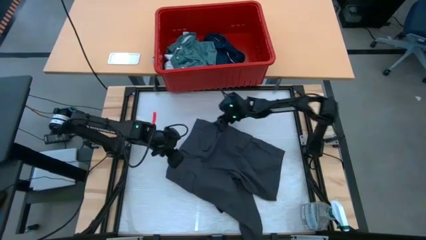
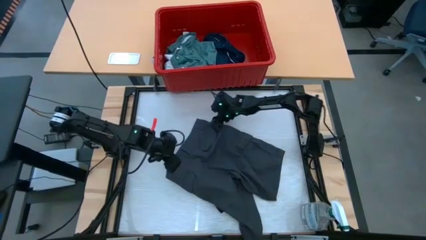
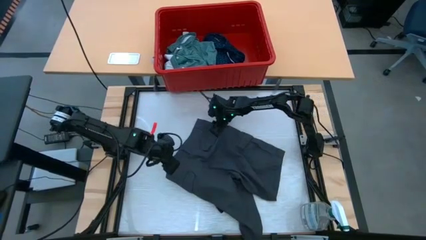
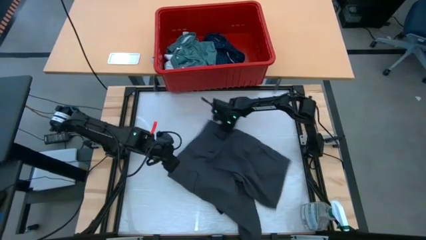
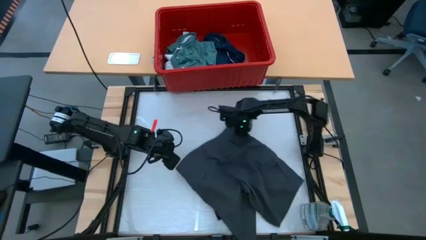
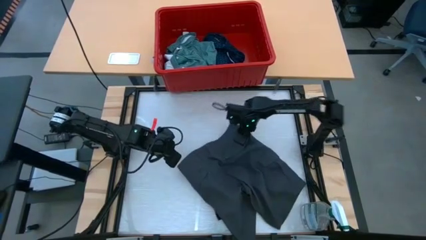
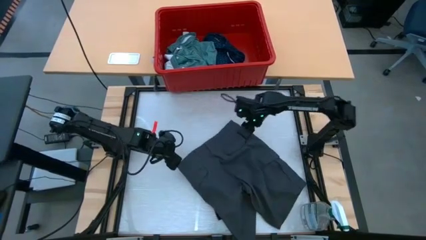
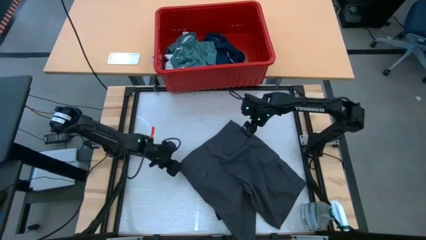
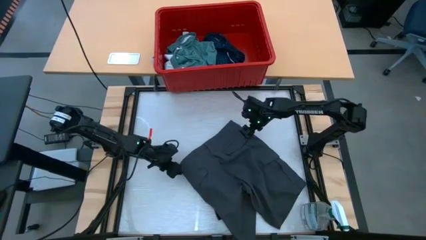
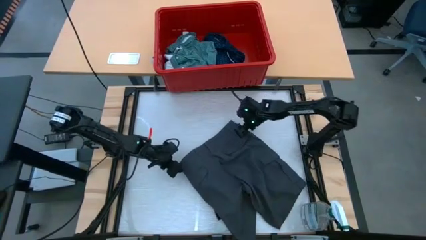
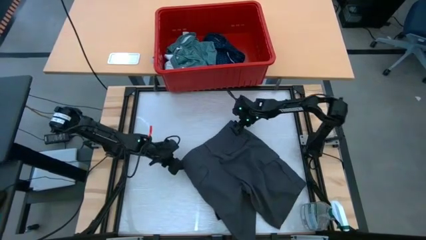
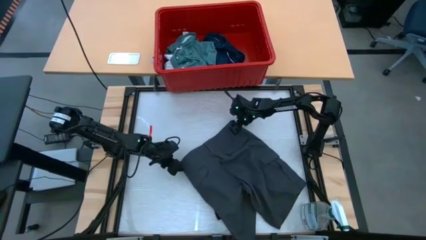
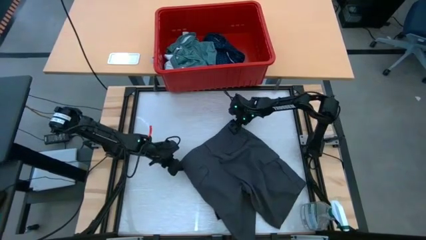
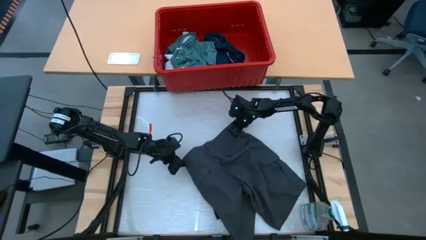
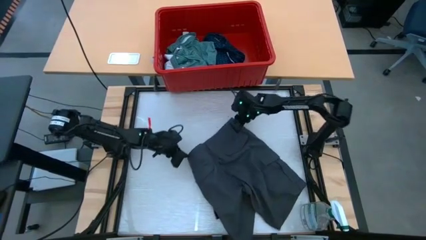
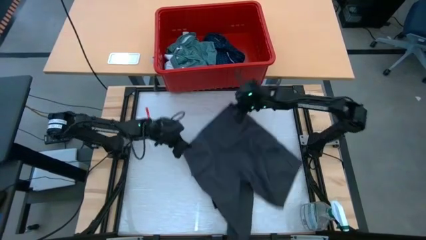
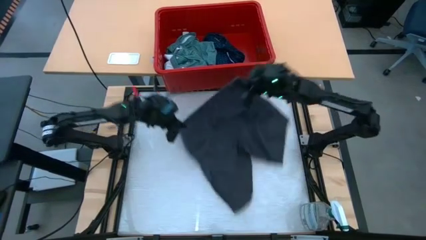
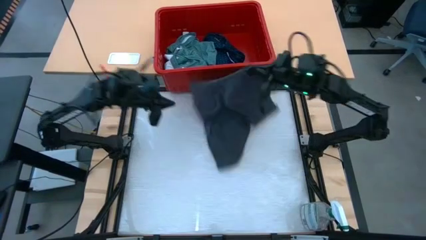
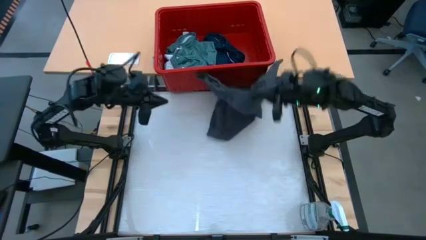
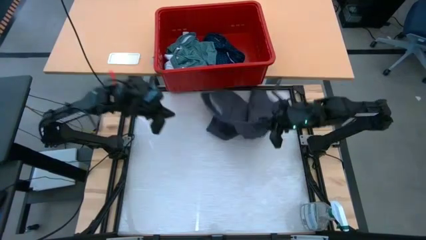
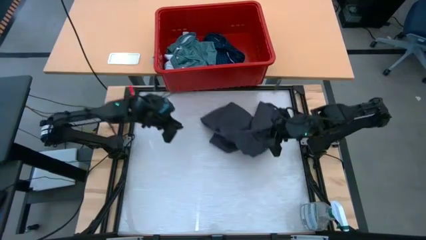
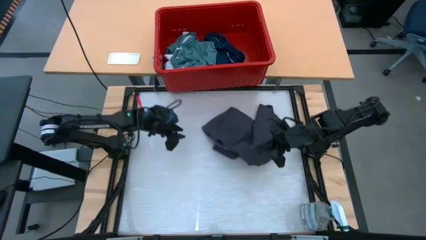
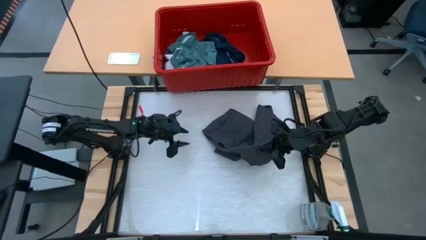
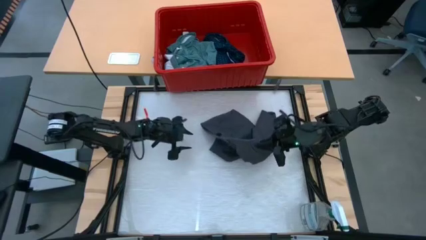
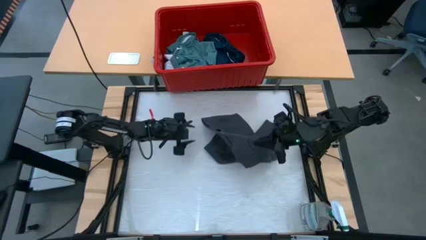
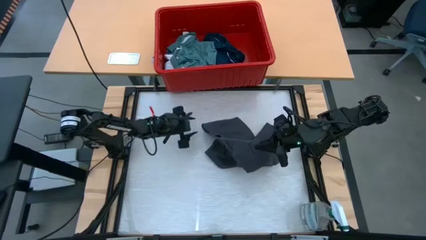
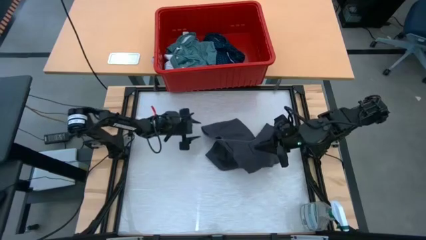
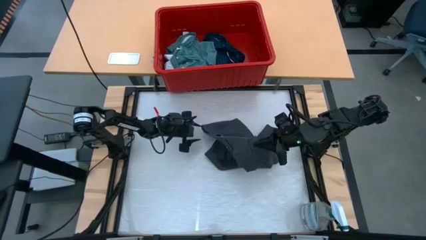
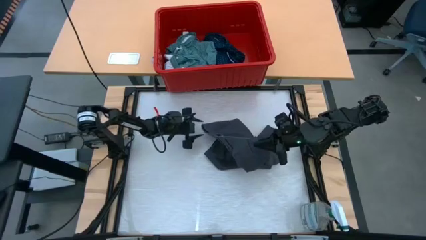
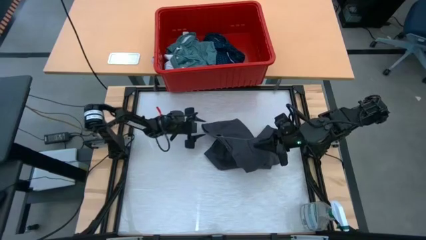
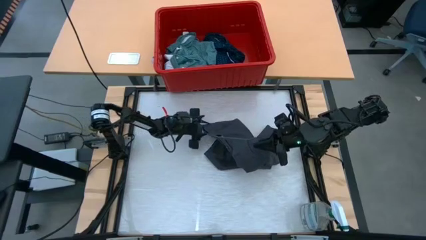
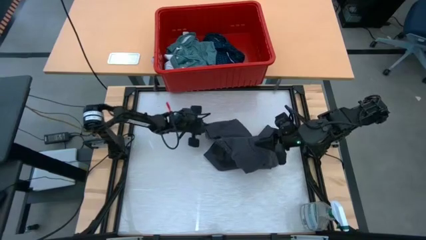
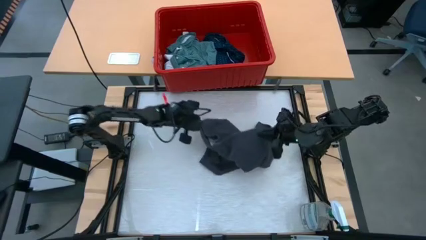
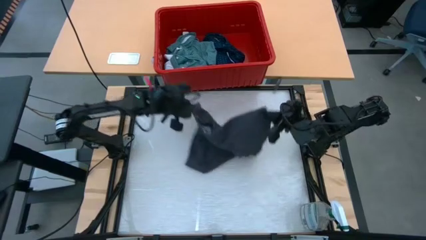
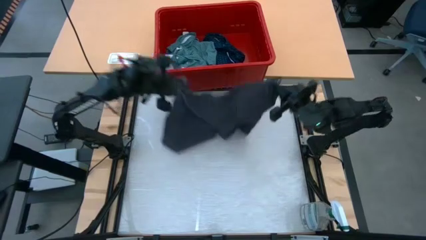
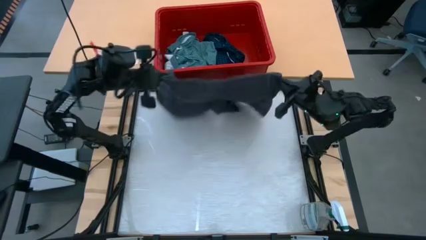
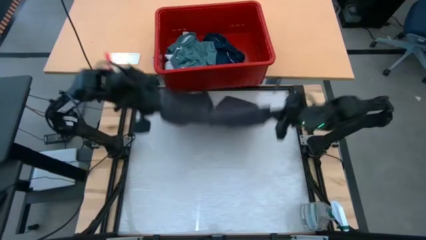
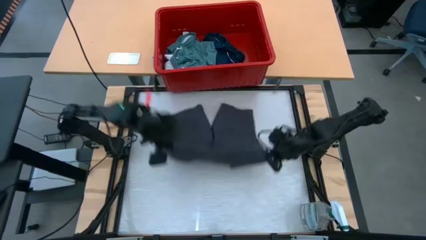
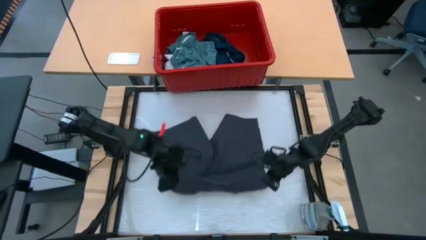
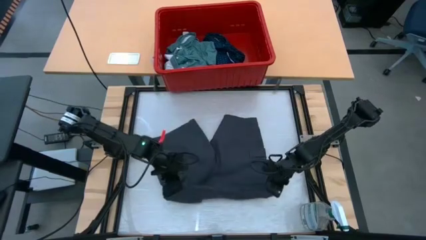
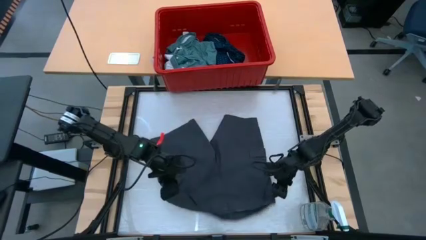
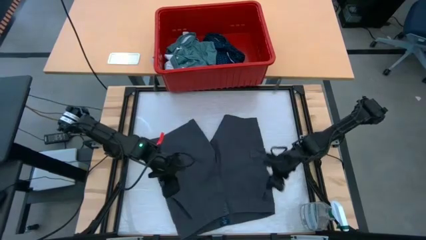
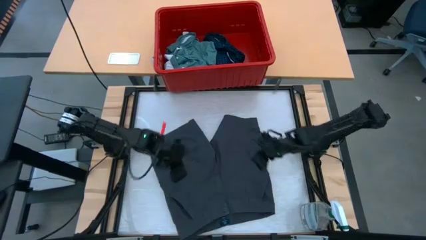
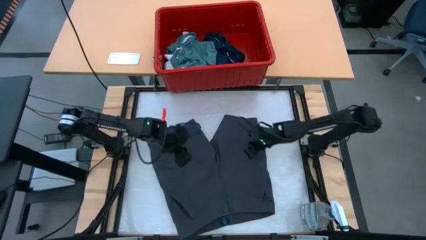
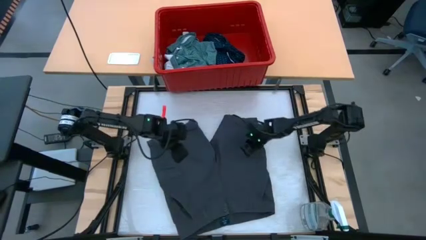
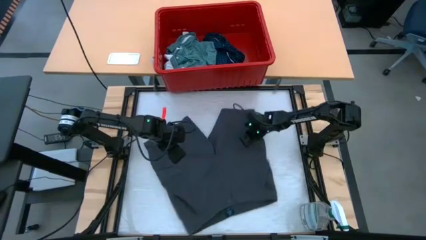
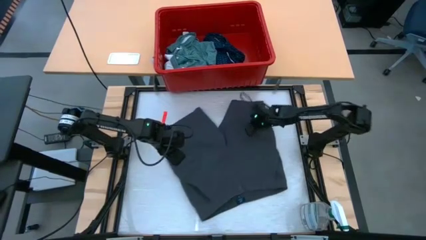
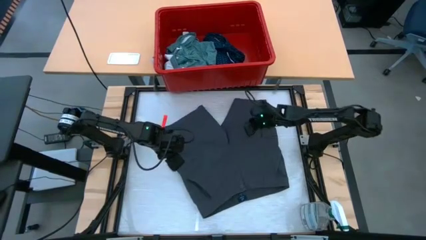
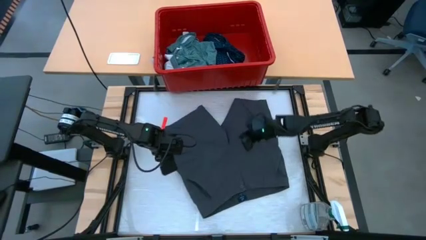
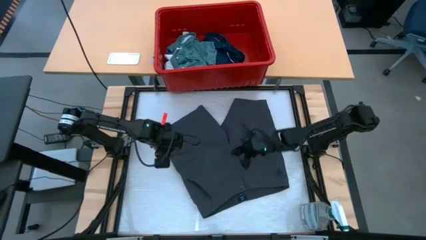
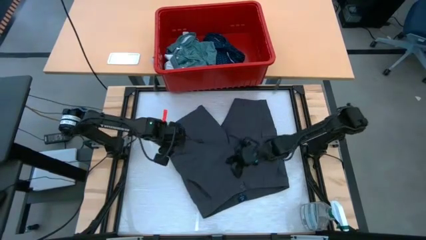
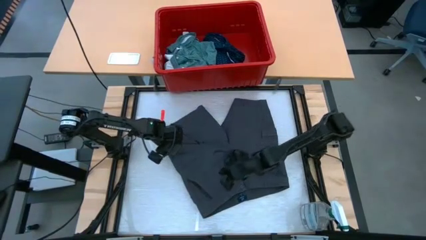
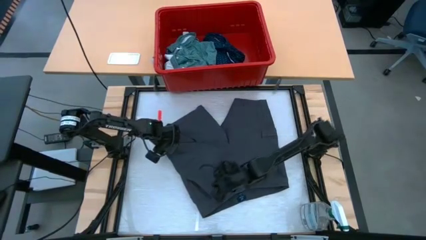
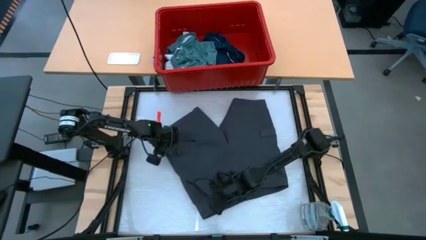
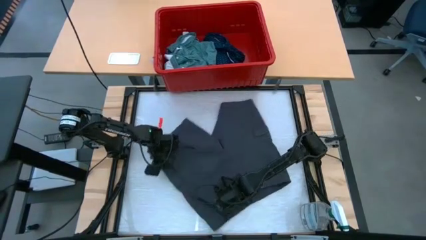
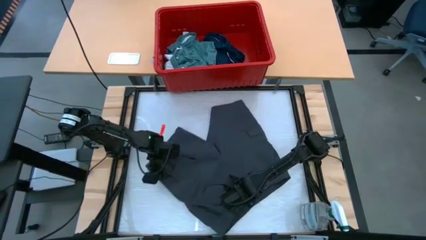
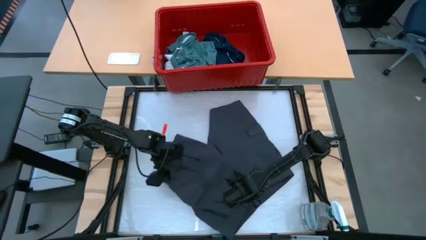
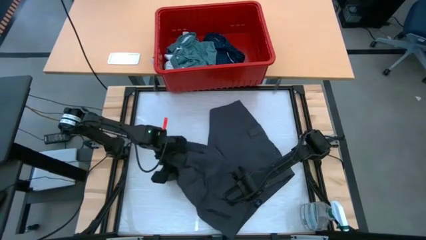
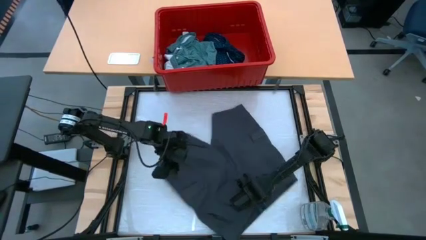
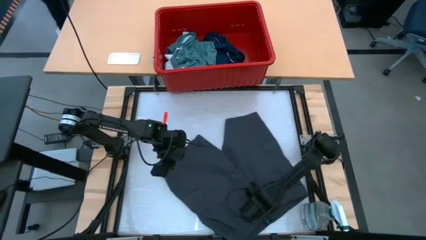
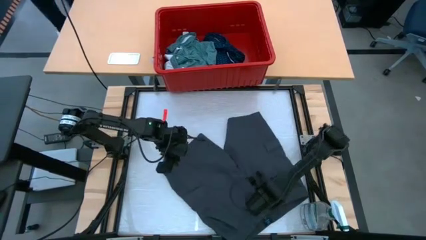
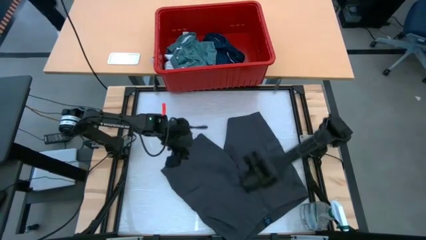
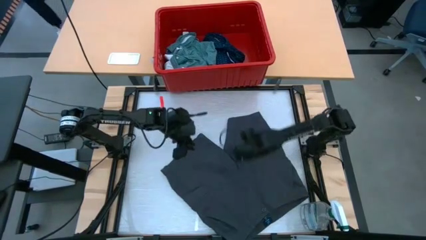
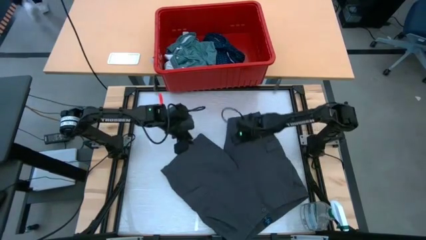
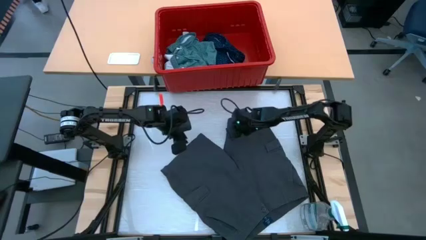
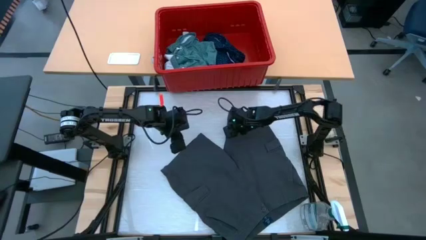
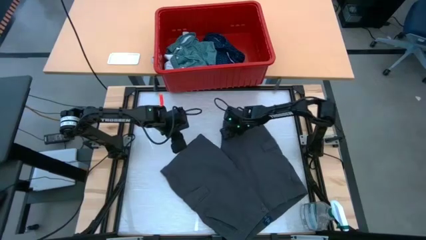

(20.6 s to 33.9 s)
Task: Fold laundry
Fold the black pants

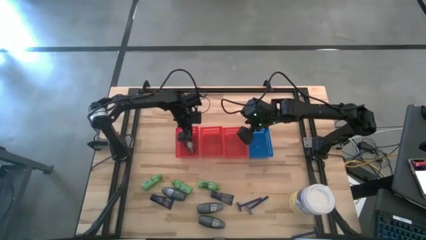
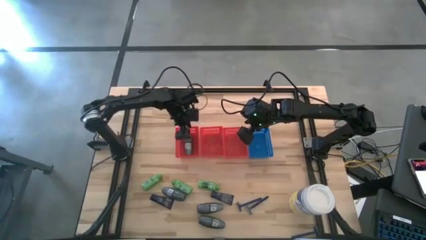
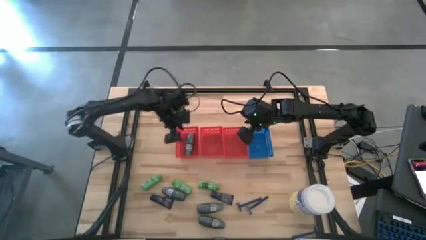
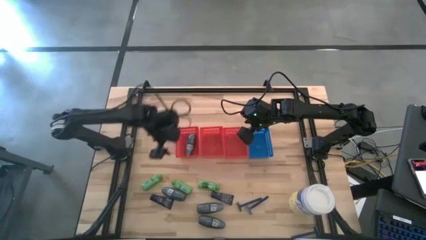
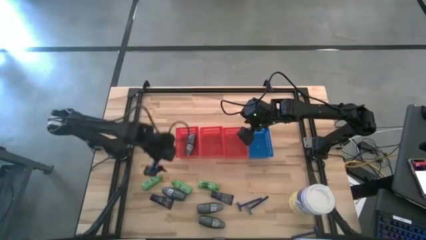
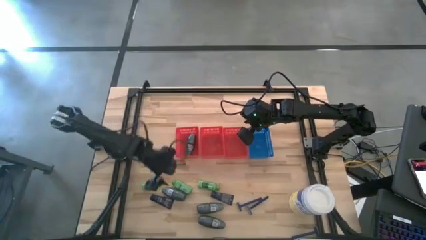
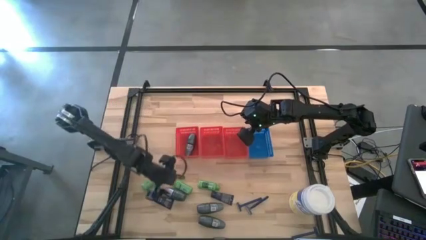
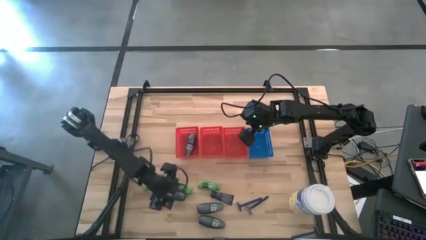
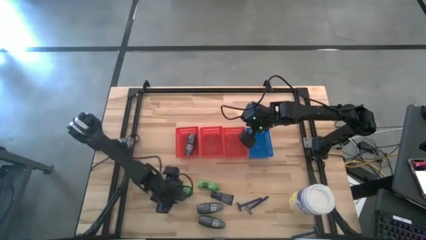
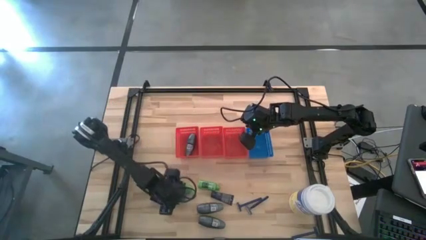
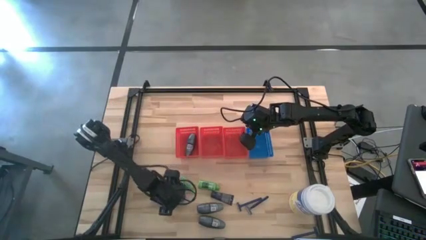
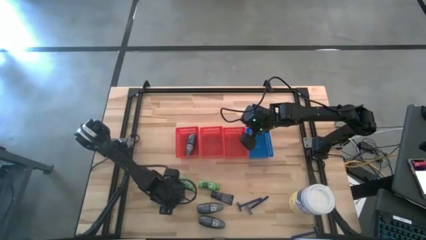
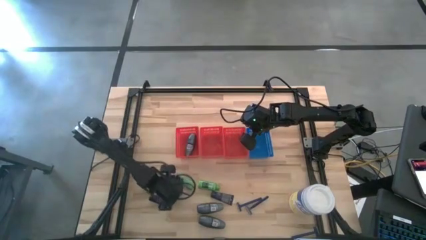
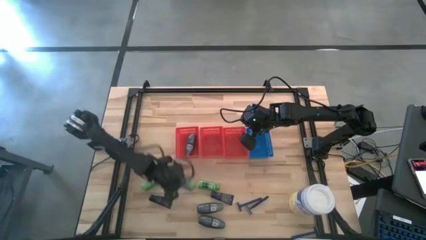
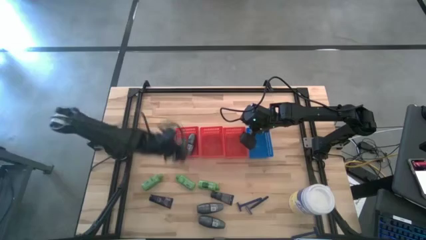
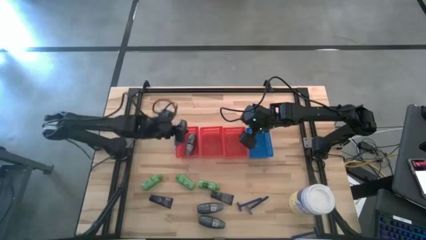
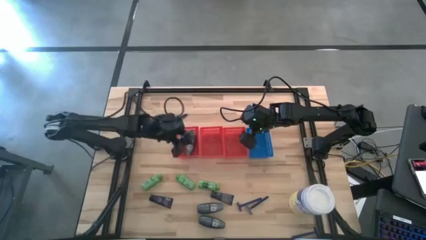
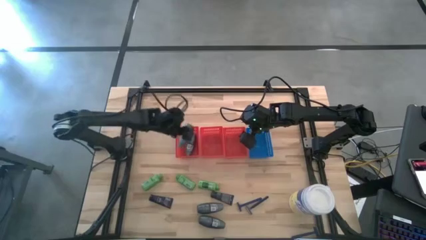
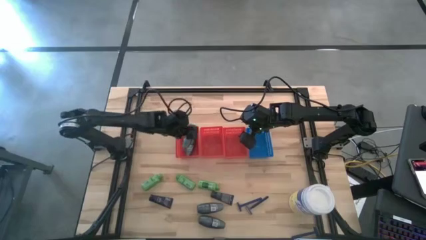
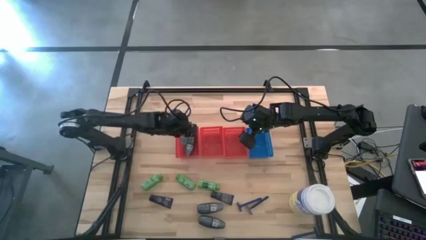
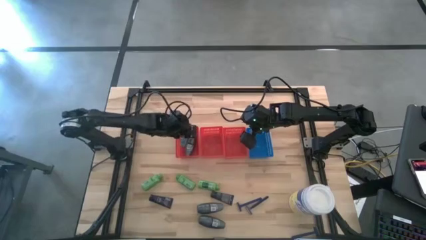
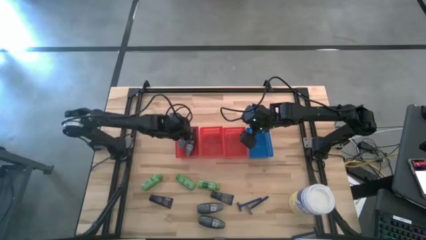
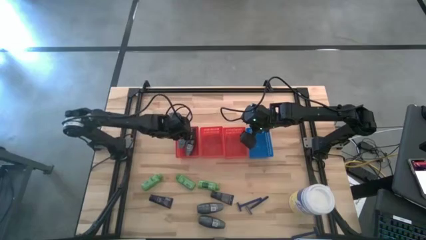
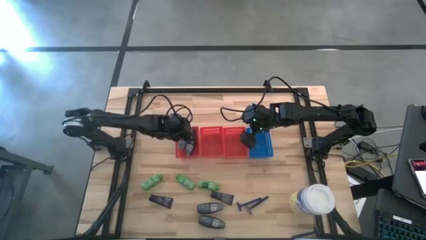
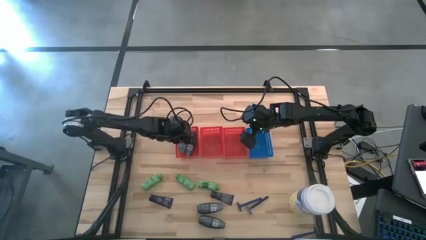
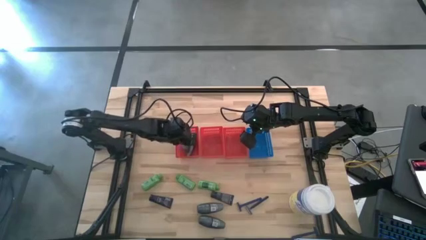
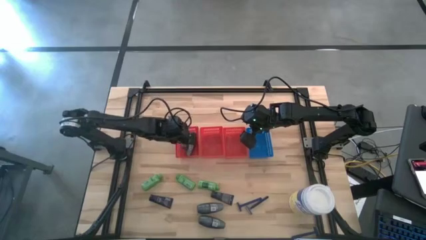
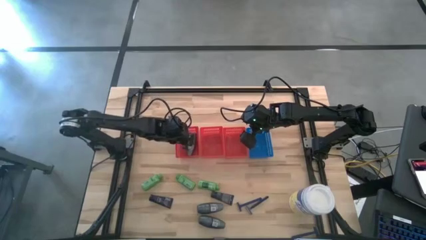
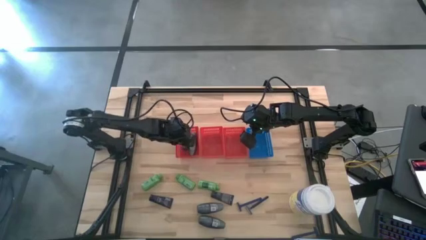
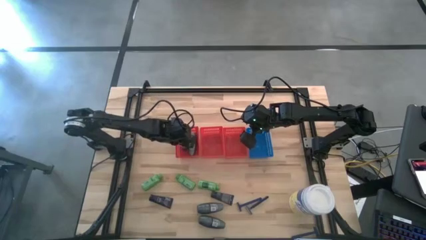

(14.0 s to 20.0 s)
Task: Pick & Place Travel size toiletries
Put the black deodorant into the left red bin
